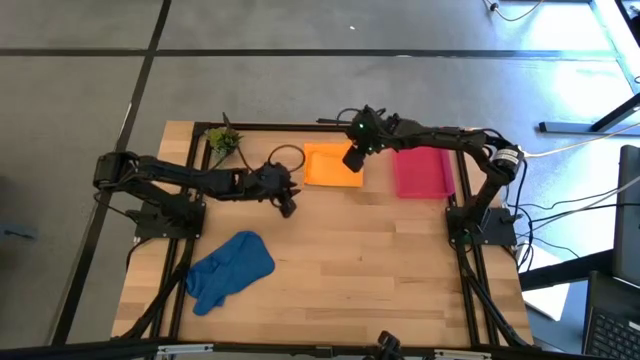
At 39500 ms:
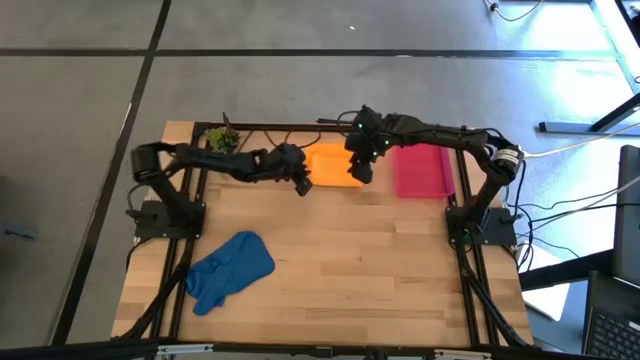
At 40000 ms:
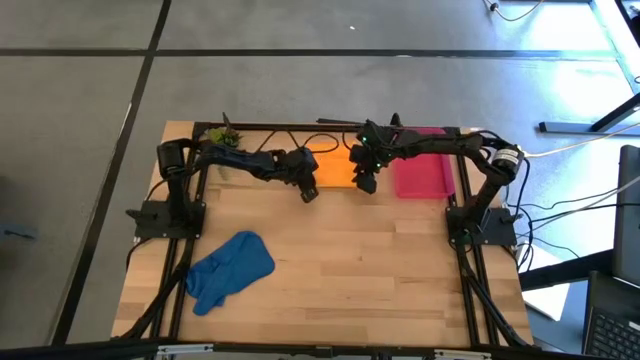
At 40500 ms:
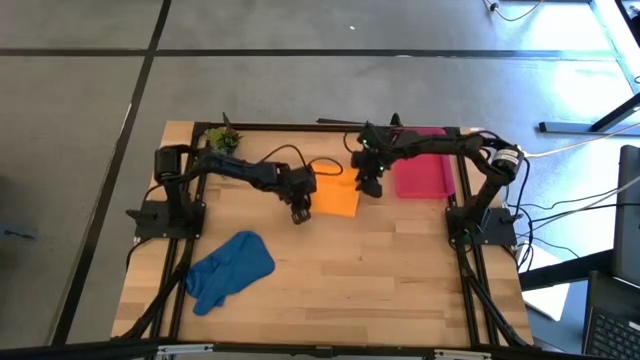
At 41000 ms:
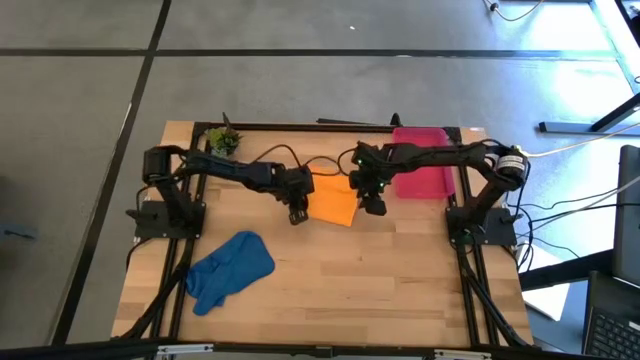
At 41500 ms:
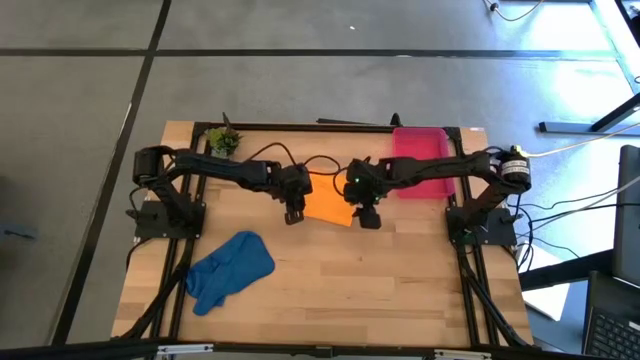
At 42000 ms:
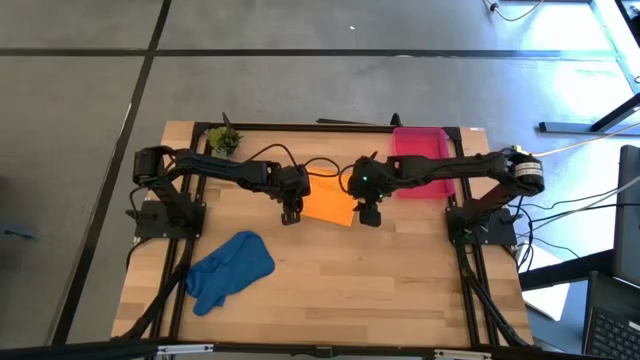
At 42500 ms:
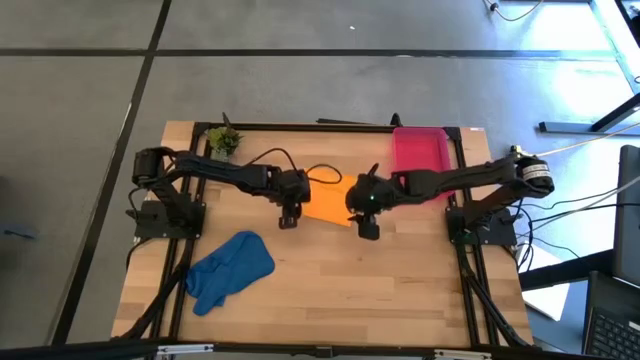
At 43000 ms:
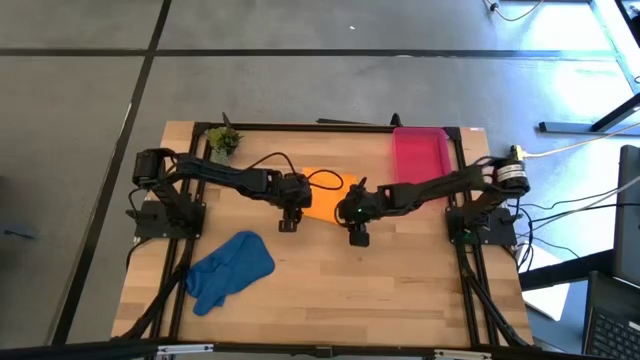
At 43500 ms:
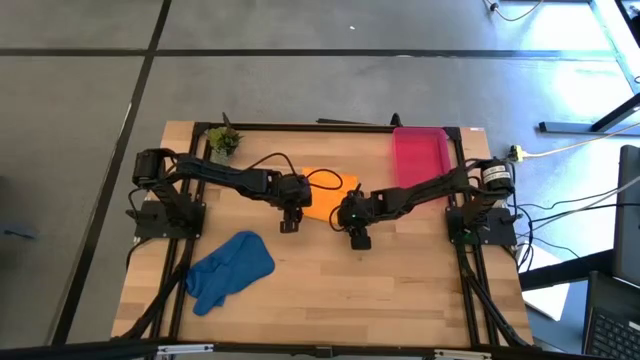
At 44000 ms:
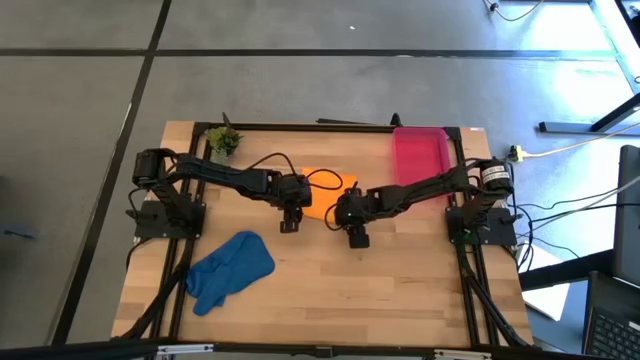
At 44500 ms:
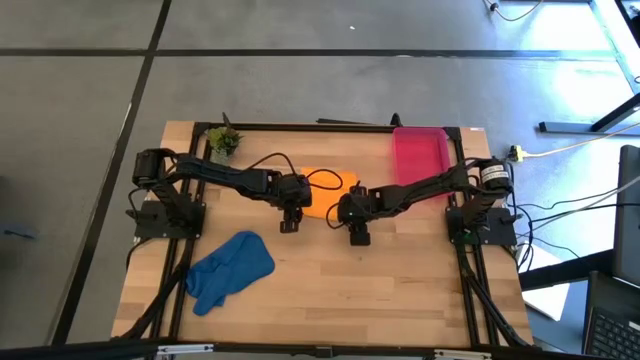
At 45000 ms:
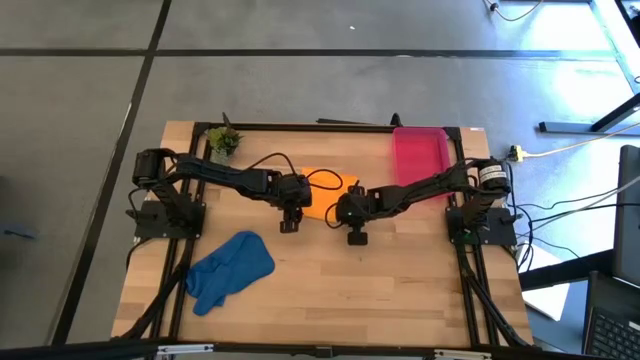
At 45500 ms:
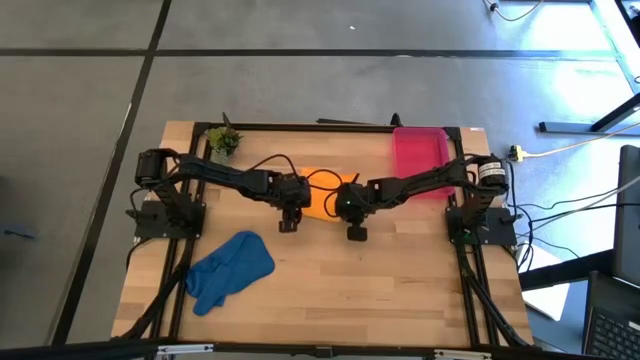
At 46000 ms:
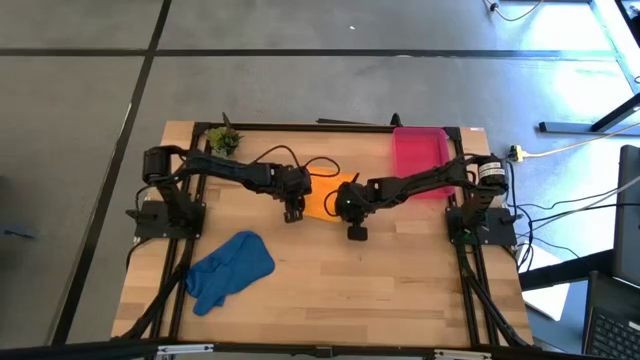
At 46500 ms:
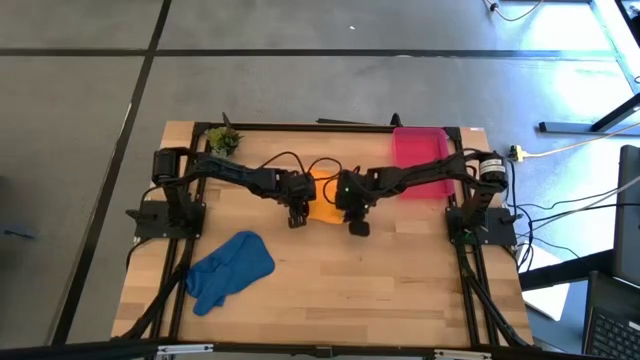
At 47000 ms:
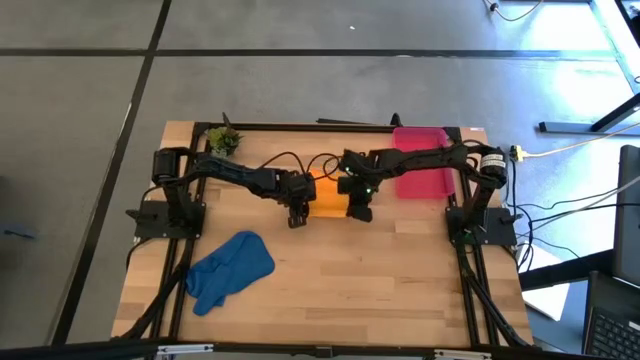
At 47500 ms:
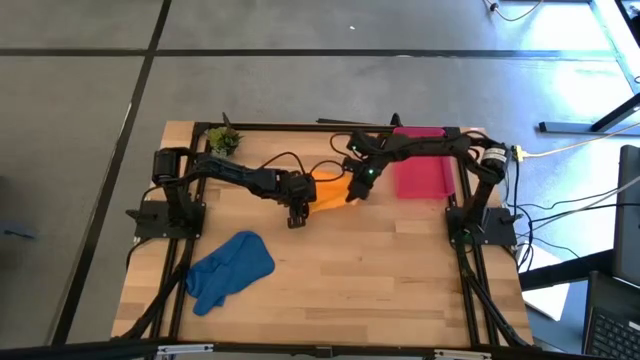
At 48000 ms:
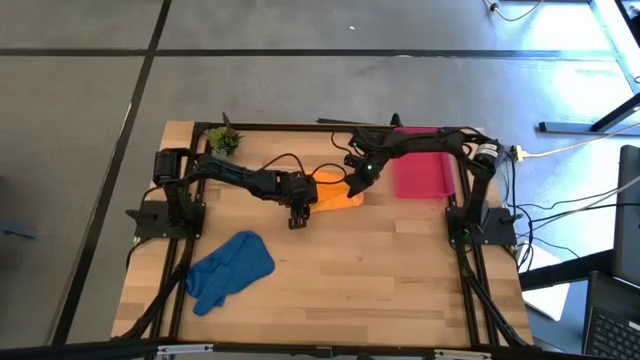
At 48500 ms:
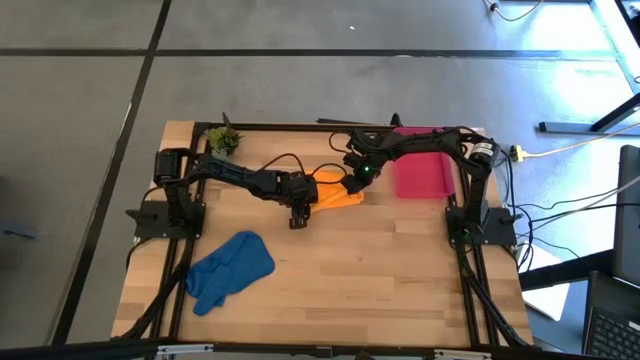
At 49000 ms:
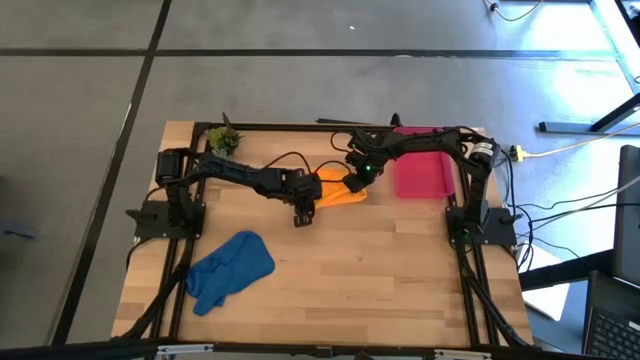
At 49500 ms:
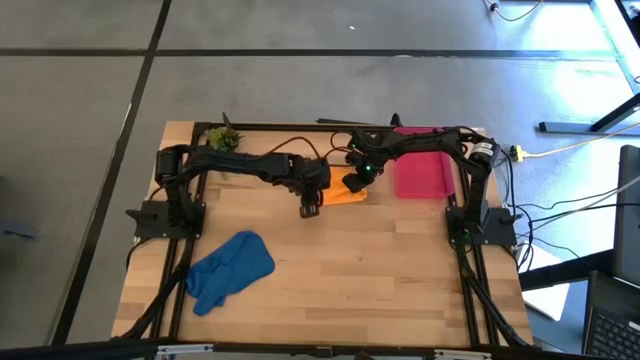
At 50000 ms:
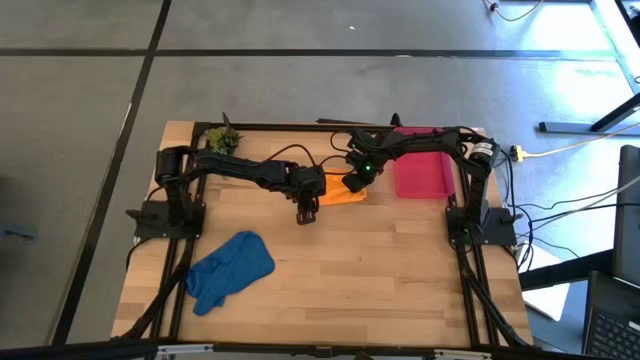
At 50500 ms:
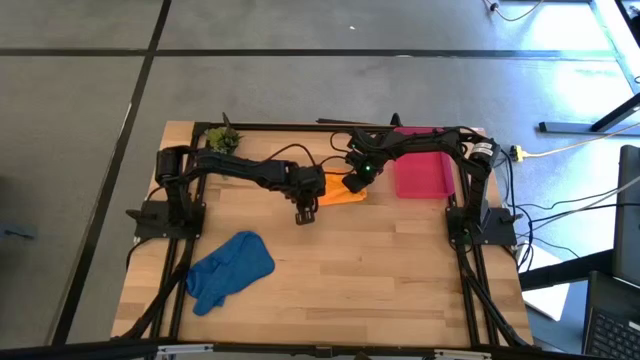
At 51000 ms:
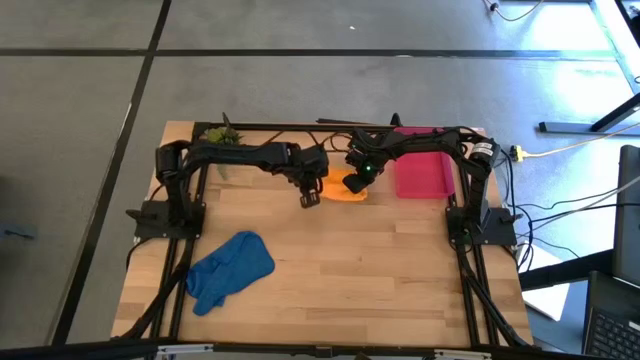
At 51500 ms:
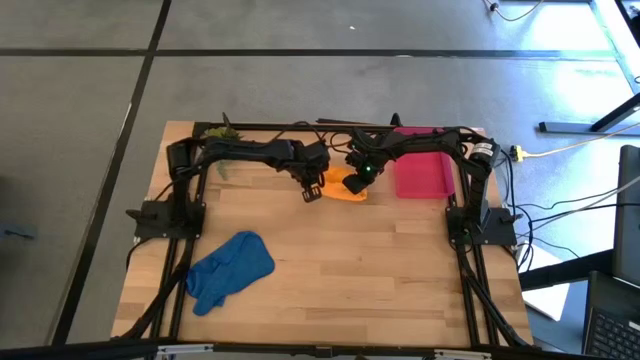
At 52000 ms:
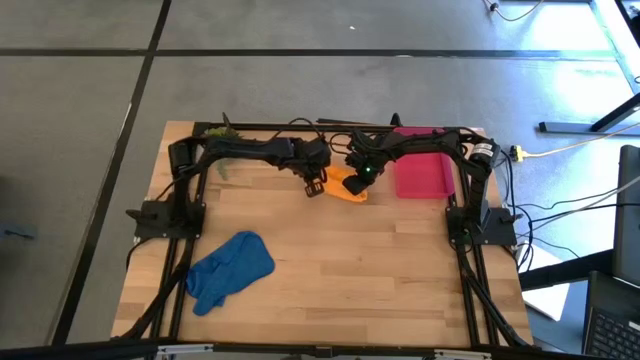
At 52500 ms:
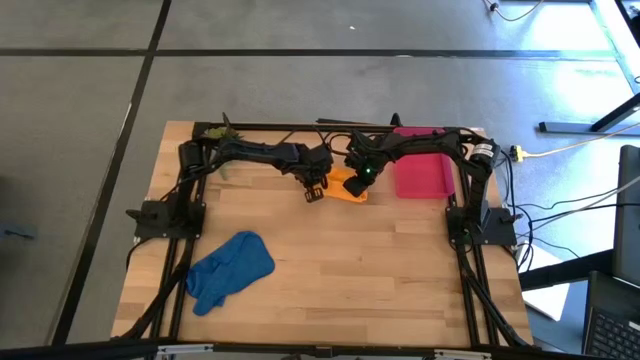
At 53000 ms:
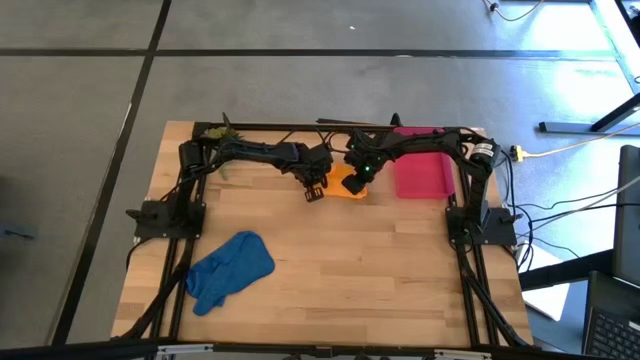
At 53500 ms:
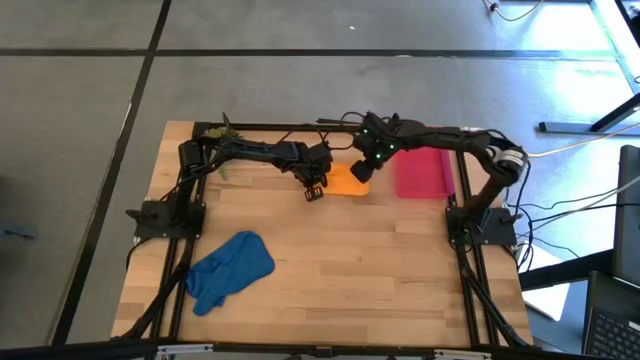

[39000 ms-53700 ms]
Task: Roll microfiber towels into tight, uniform cylinder then place into a basket
Roll the orange microfiber towel

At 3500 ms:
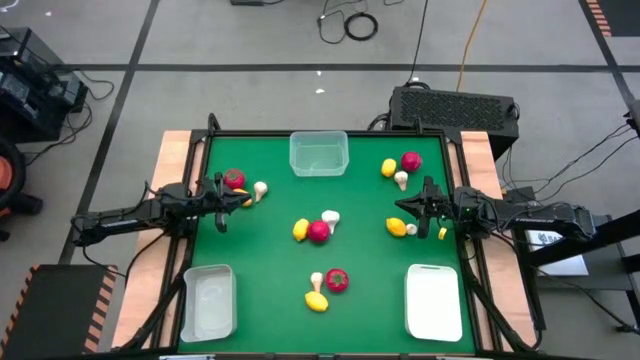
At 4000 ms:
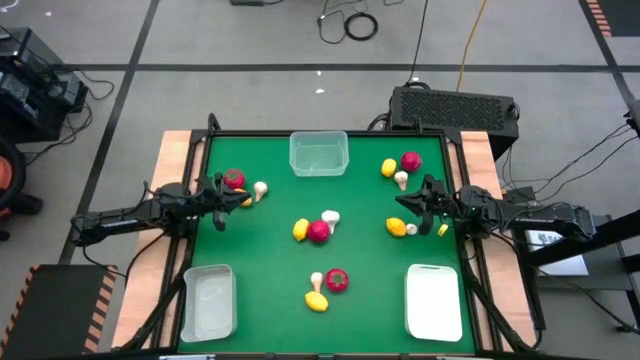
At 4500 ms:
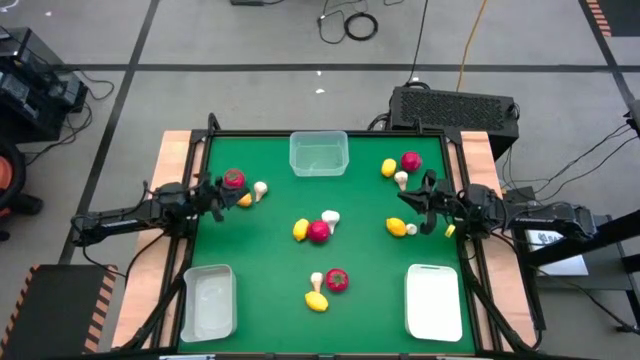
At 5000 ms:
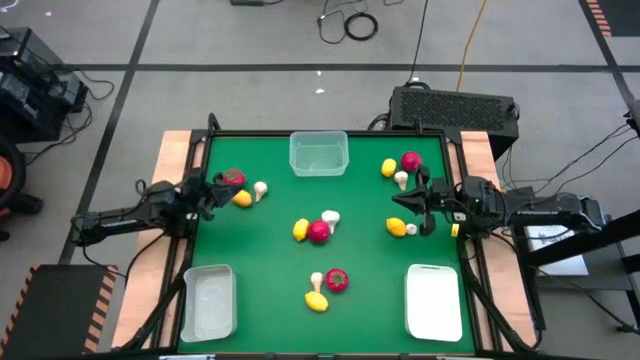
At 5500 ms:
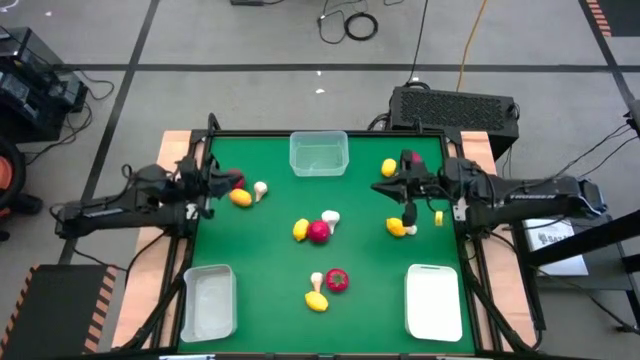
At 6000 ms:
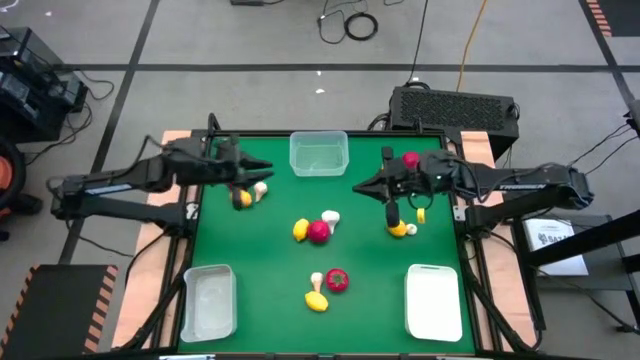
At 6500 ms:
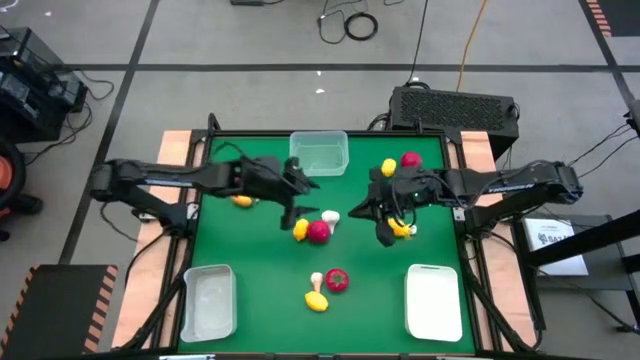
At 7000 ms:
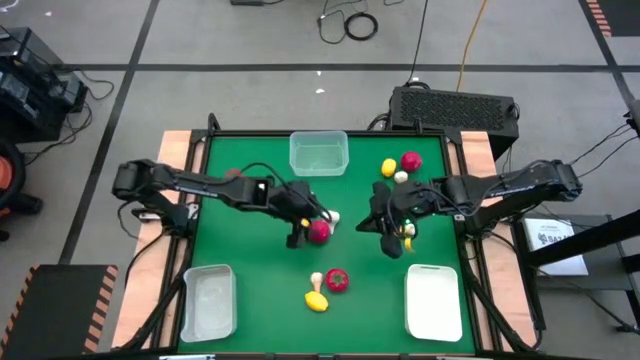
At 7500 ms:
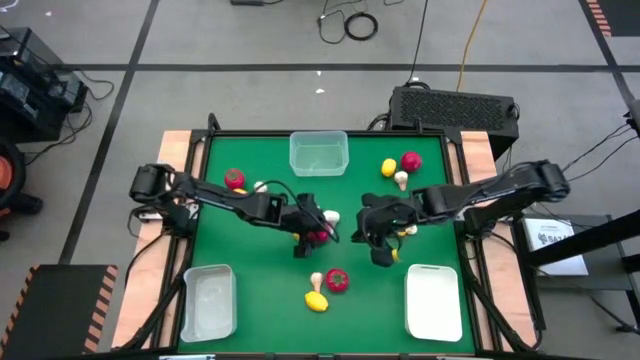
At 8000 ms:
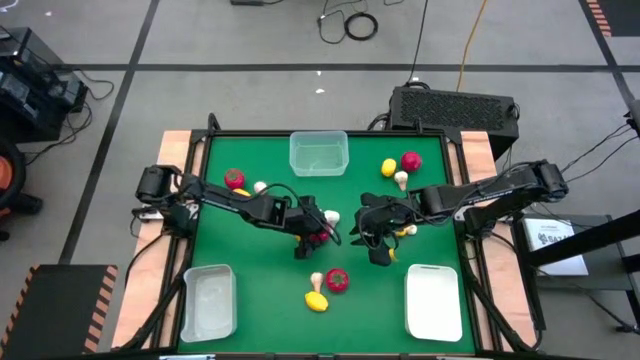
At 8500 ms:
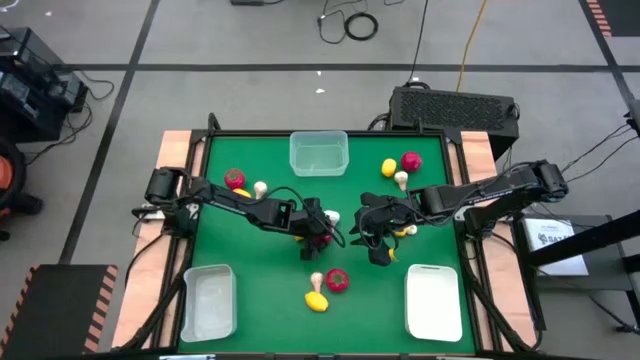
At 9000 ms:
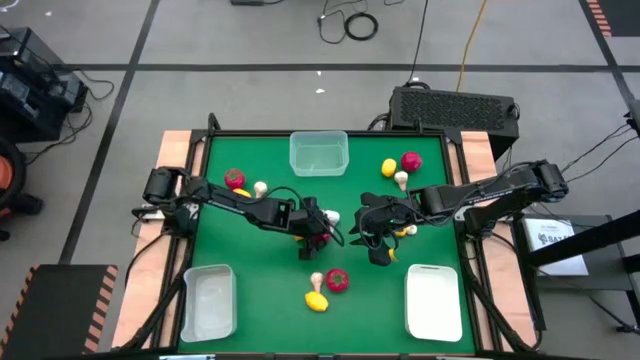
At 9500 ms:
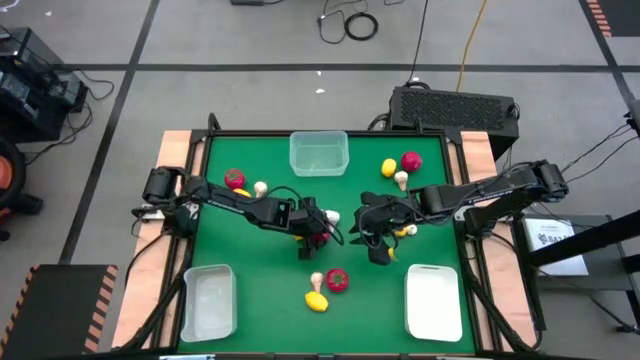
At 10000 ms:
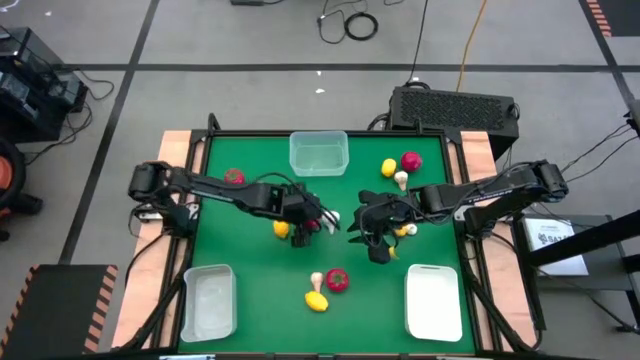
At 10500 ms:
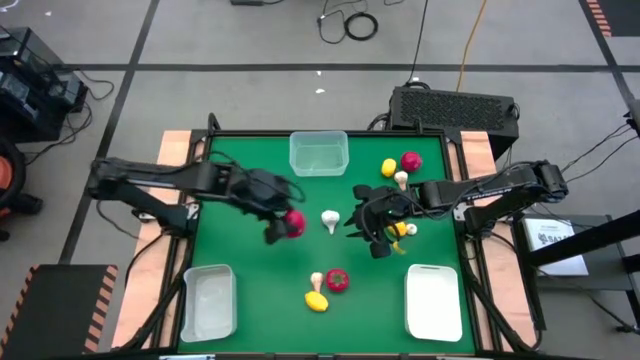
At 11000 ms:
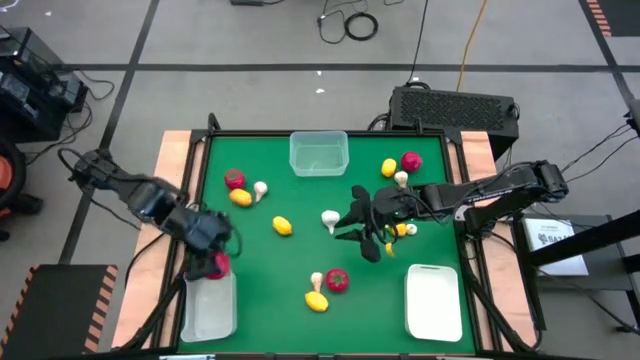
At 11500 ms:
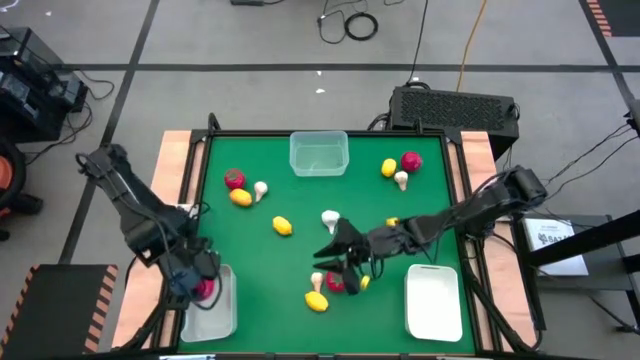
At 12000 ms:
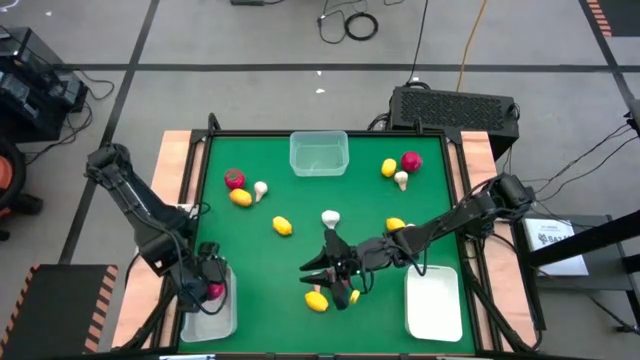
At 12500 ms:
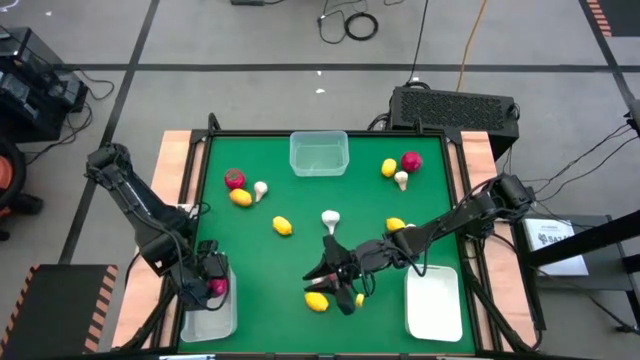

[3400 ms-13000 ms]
Task: Sort produce into baskets
Put the tomato into the gray bin
